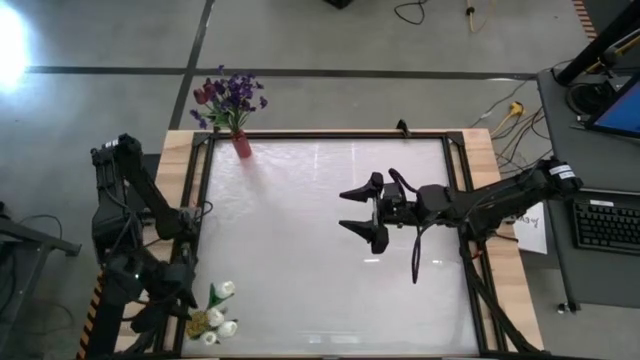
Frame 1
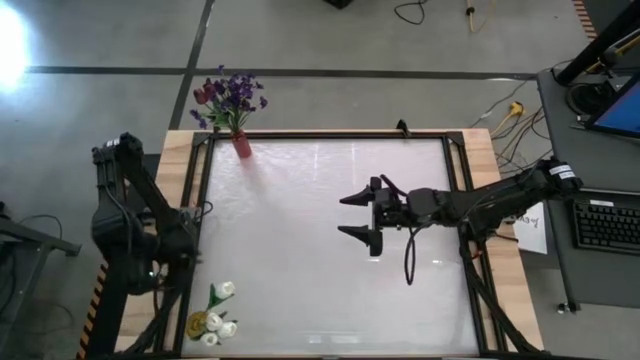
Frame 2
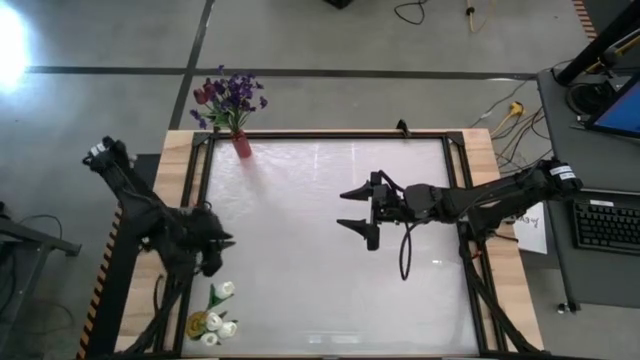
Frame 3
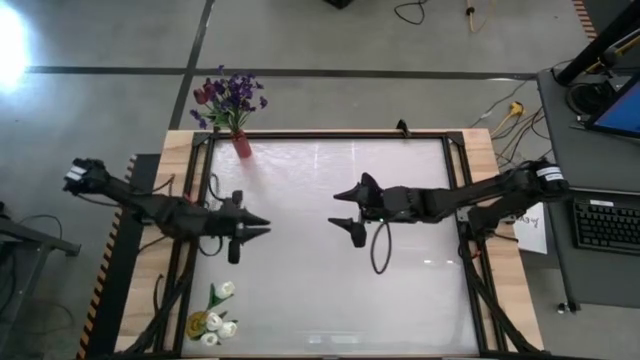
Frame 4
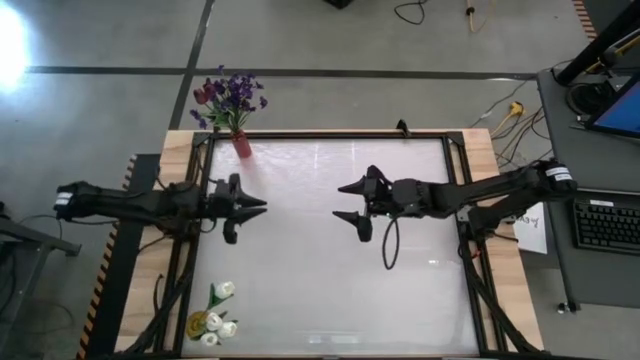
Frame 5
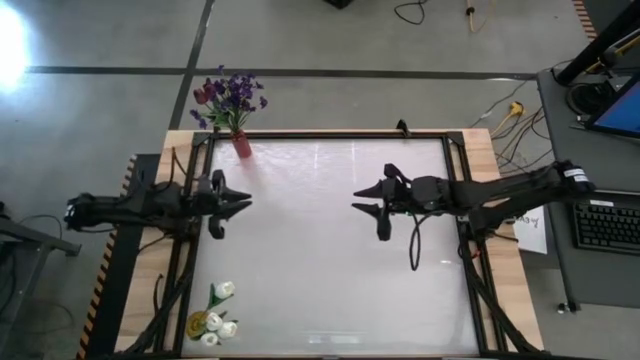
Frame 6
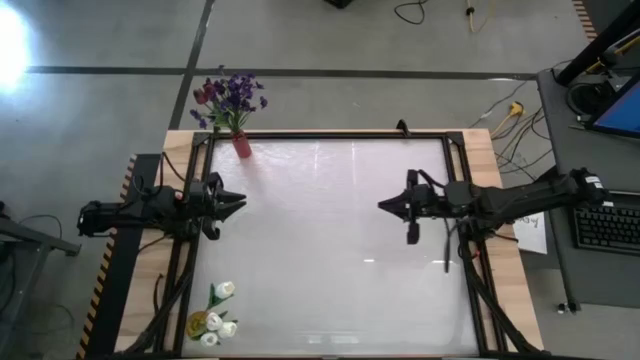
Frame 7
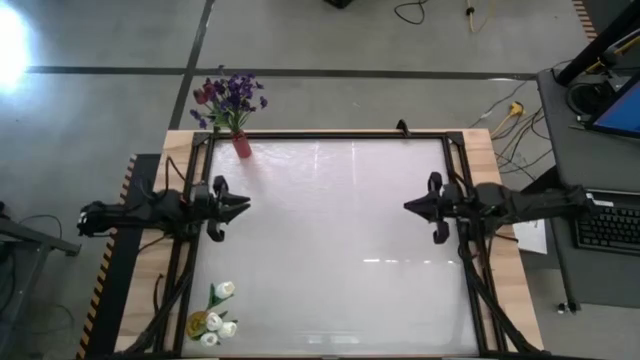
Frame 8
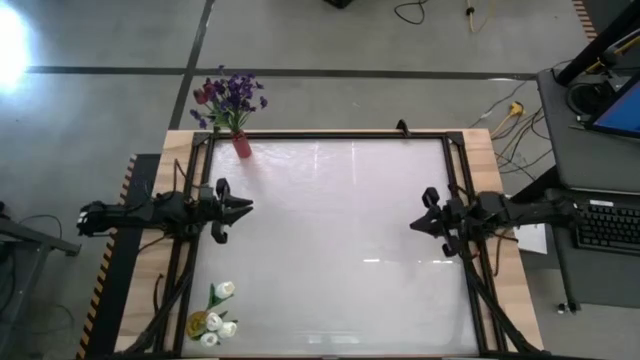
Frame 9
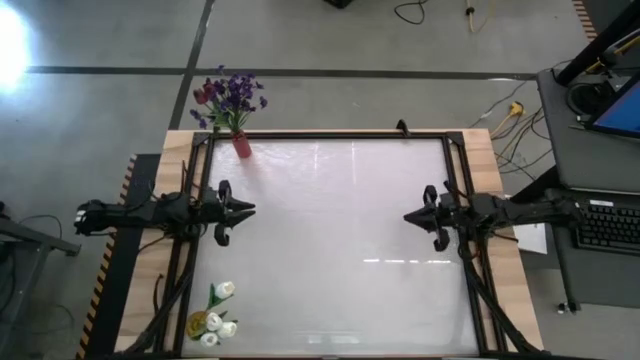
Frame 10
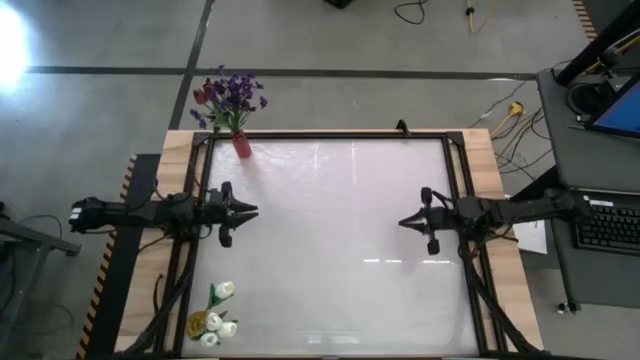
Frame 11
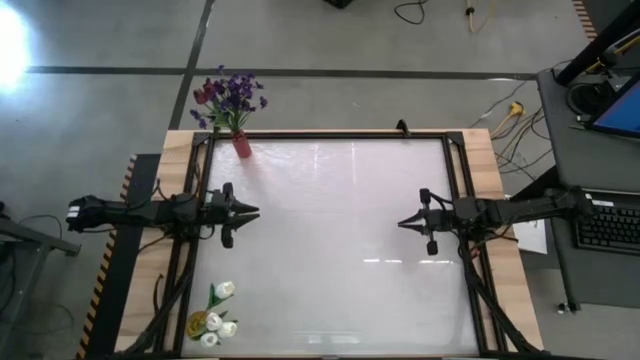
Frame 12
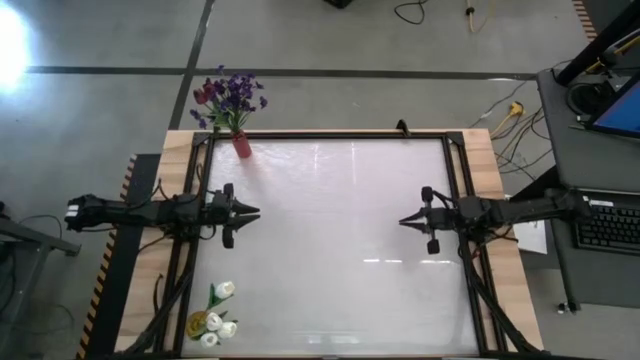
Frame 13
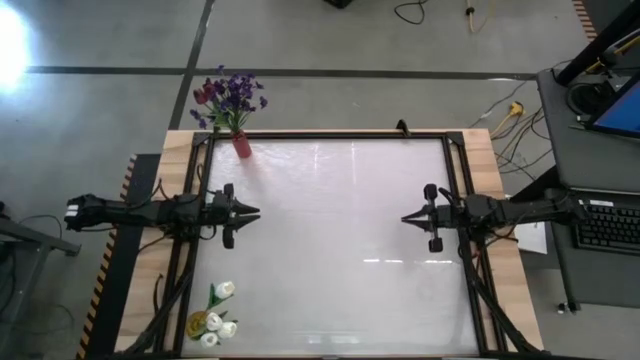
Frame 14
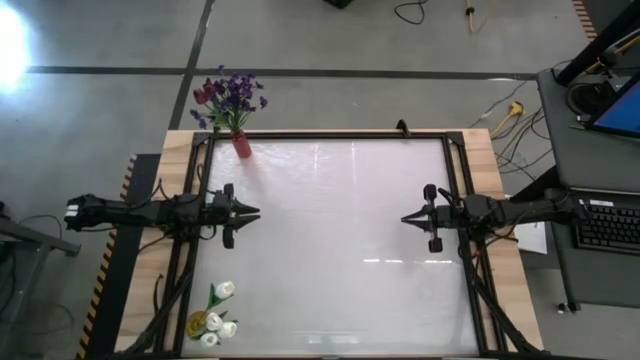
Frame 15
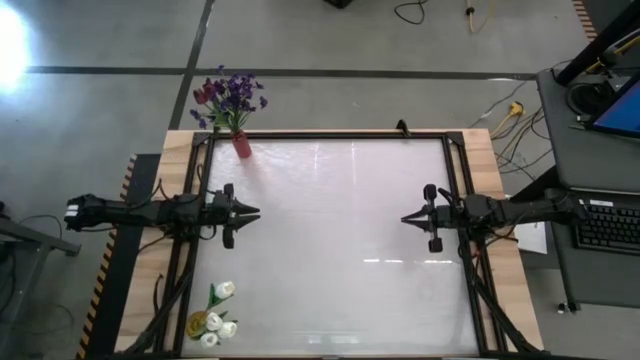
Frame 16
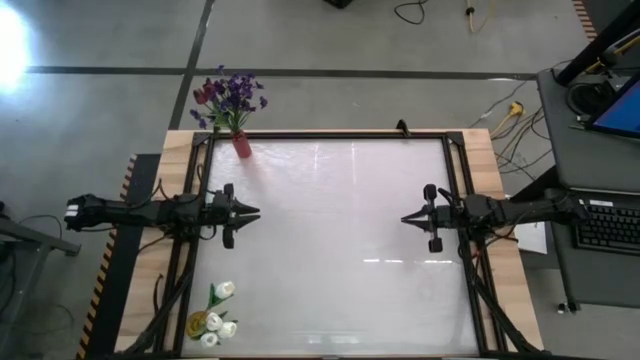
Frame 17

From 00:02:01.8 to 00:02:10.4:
Task: Sort flowers into vase by color
Return to Home Position

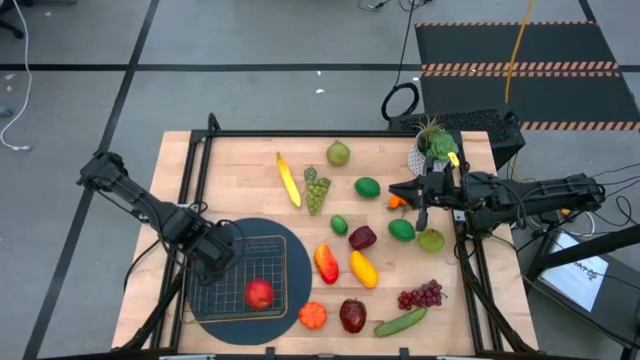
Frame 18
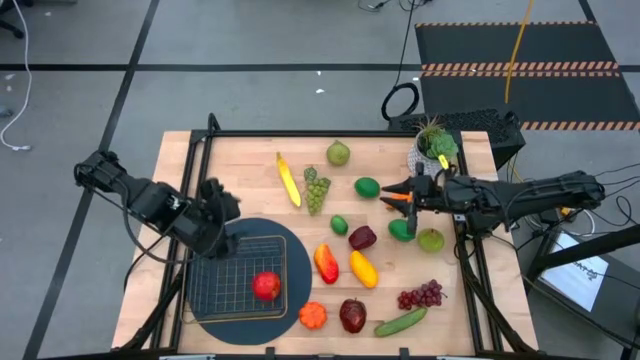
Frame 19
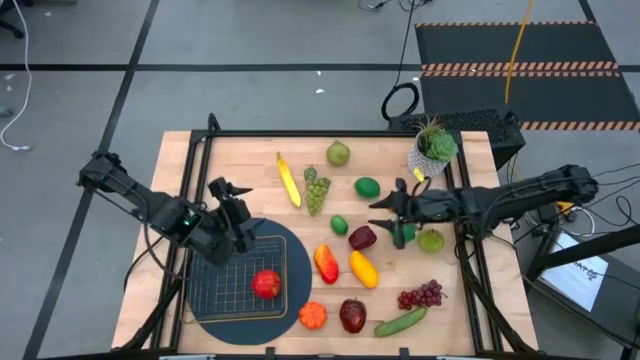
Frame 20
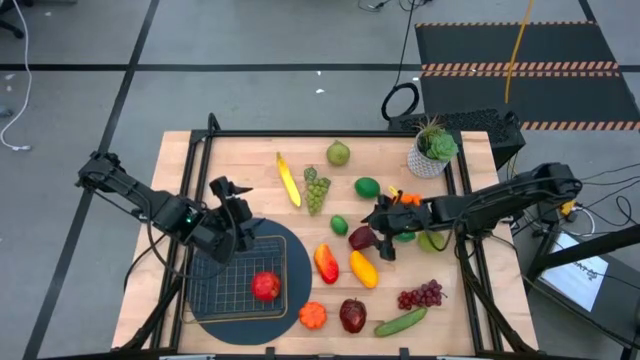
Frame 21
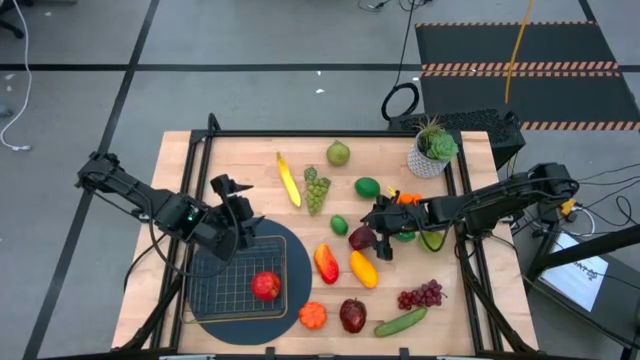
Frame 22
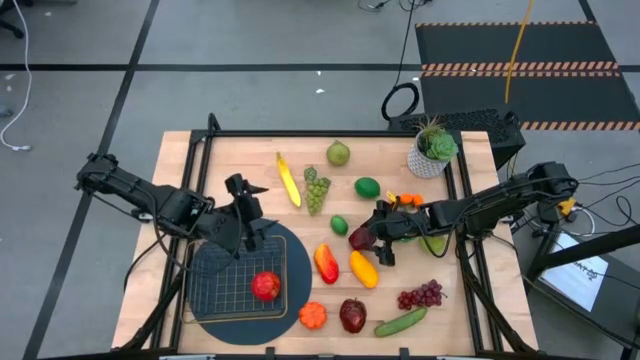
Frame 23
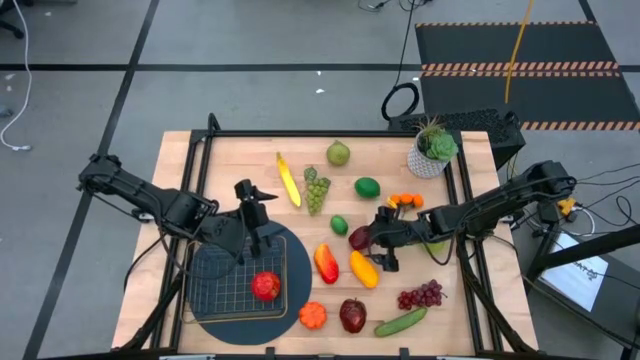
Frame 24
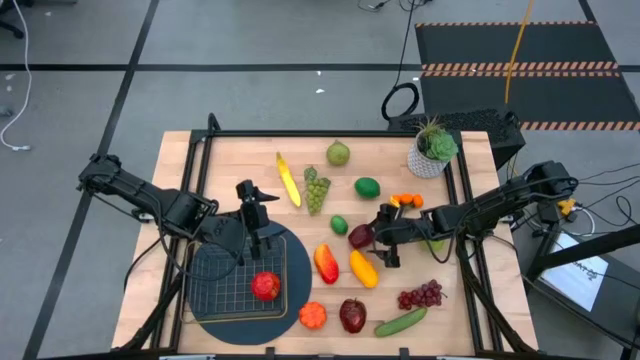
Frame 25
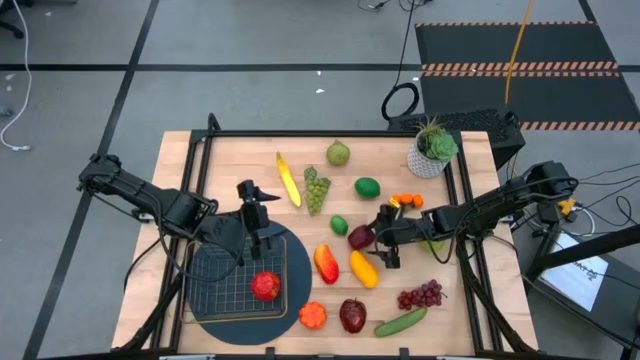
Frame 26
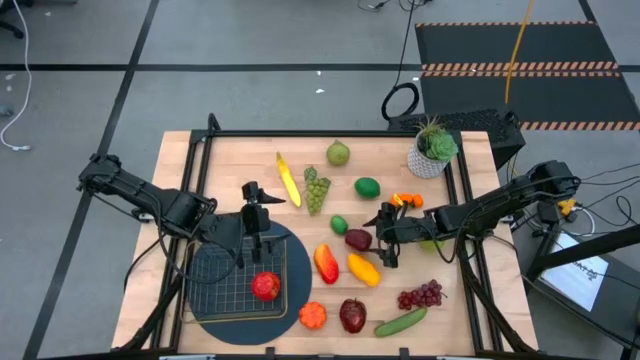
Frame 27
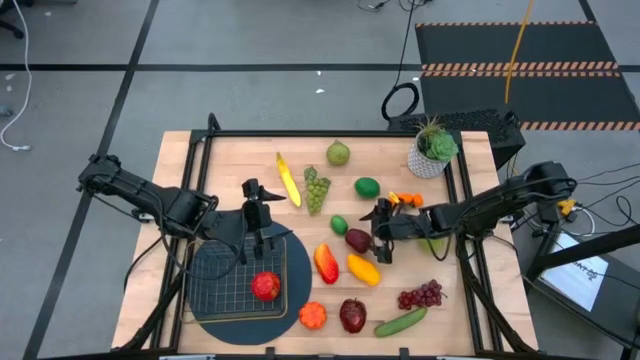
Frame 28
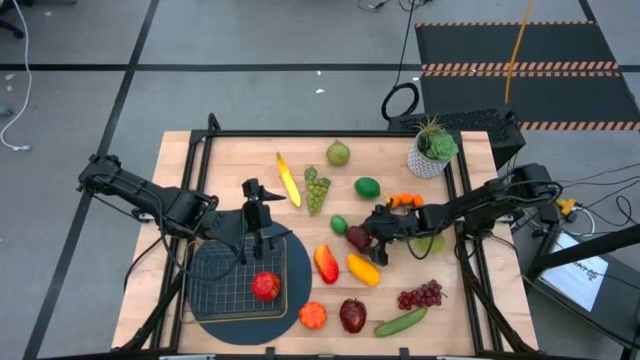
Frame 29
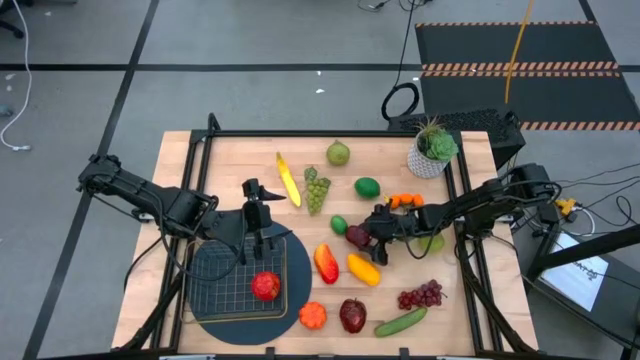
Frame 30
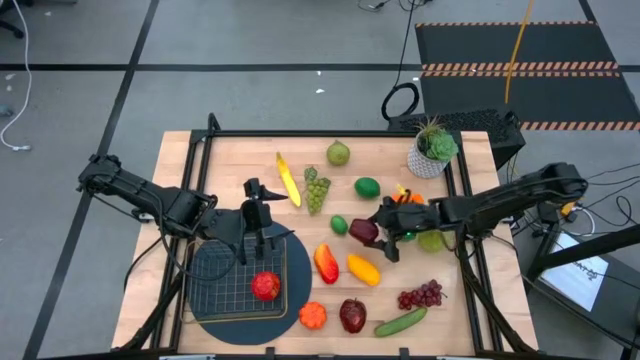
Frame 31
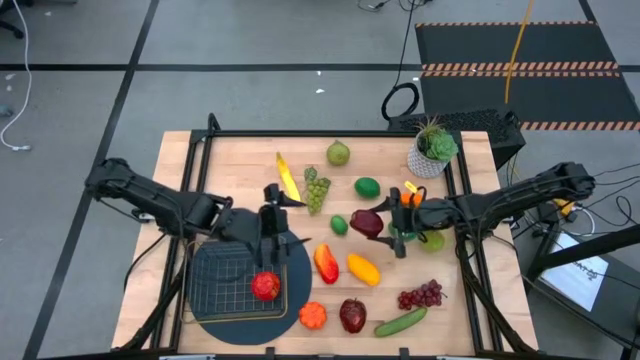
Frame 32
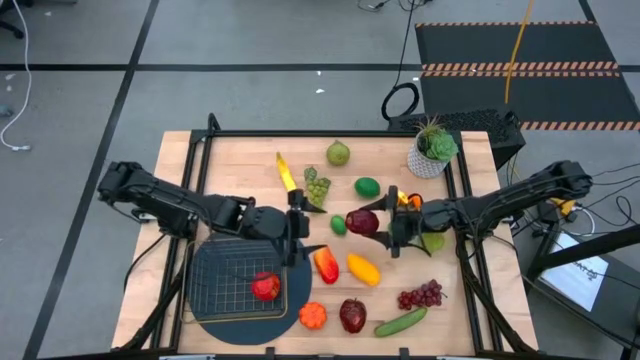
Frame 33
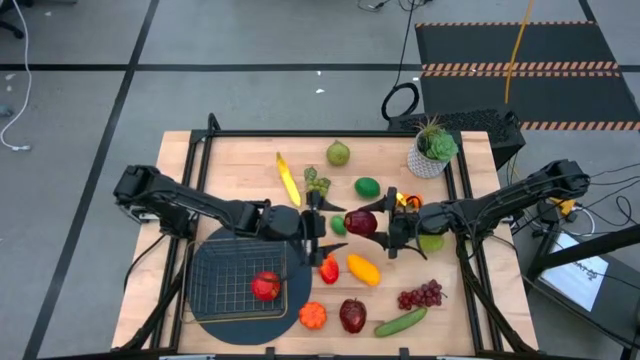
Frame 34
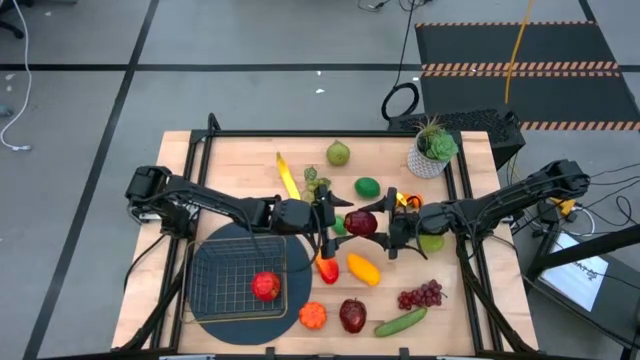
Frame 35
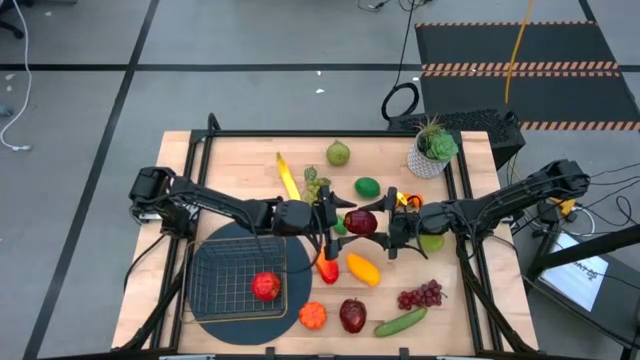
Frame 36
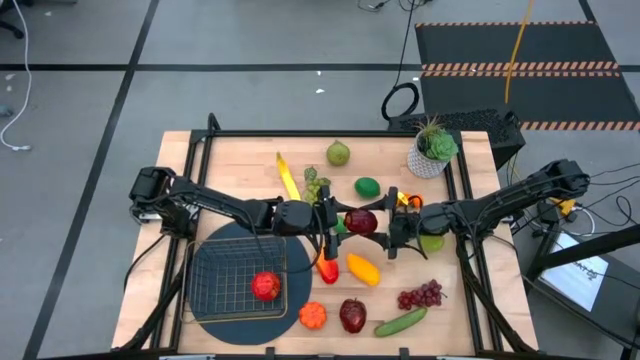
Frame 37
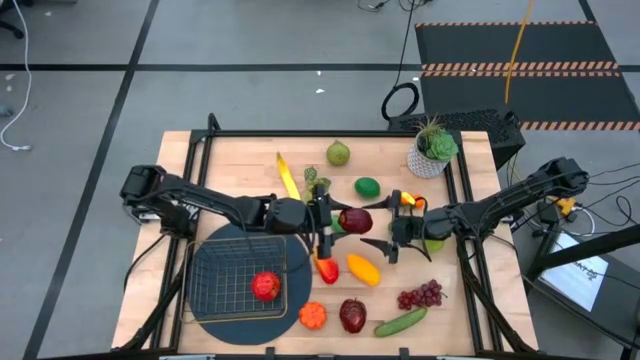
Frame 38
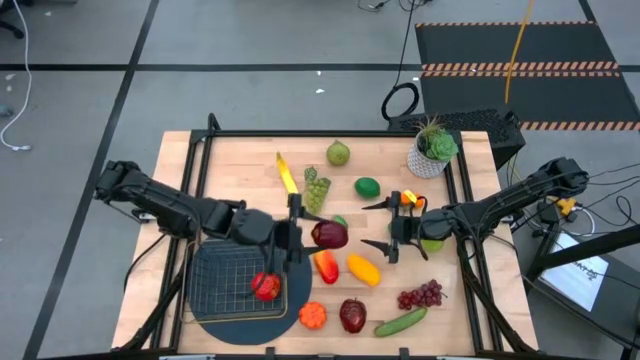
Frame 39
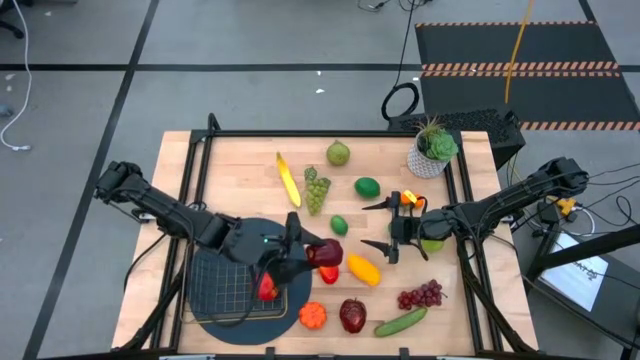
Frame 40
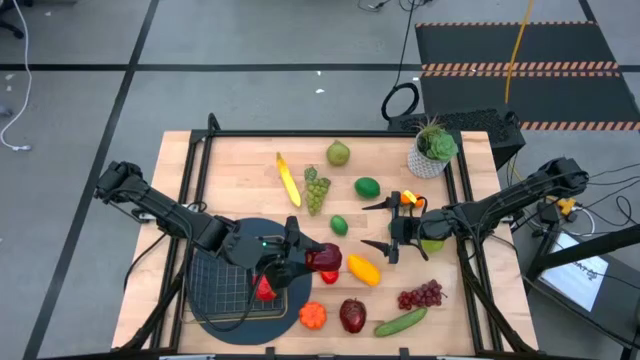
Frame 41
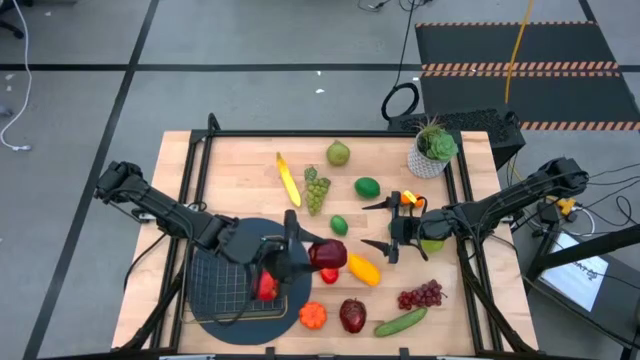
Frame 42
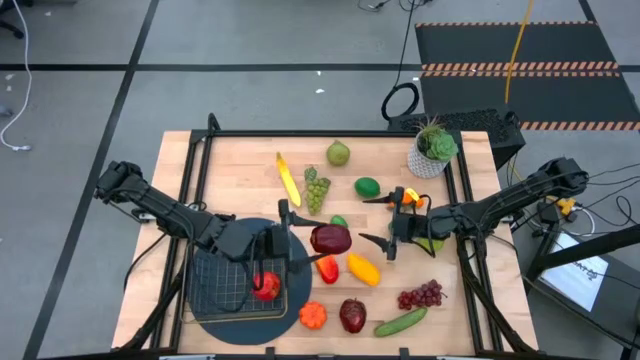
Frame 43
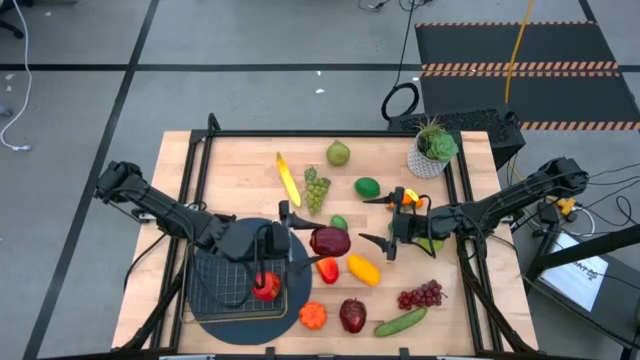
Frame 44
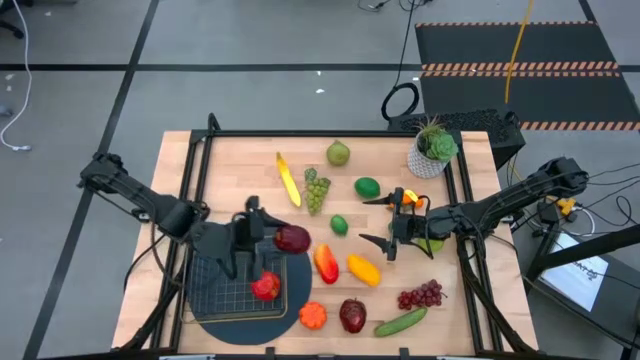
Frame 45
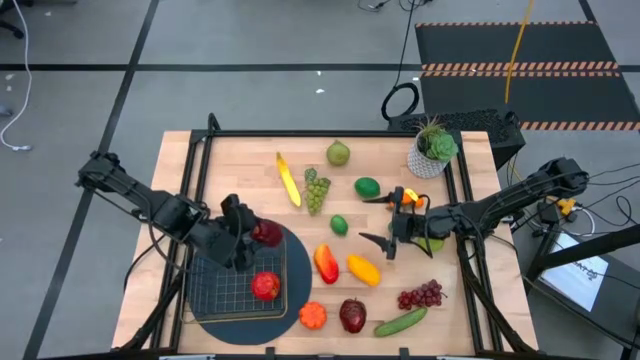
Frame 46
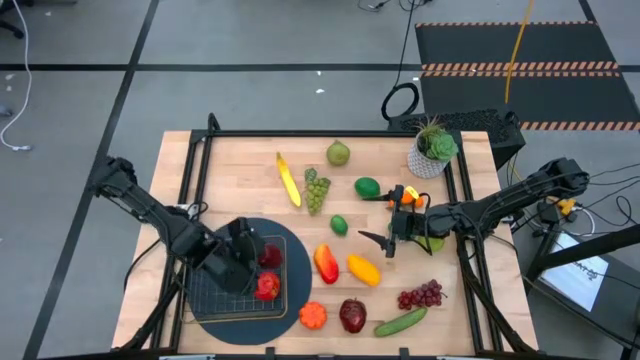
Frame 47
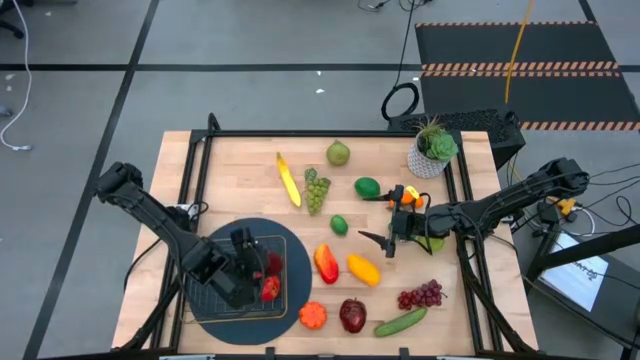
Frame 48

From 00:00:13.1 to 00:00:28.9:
Task: Build produce basket
Put the top dark red apple into the gold wire basket
